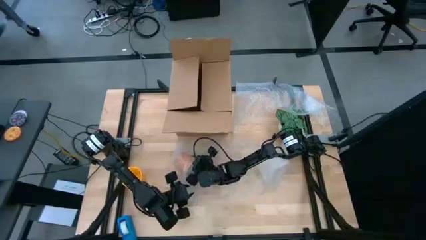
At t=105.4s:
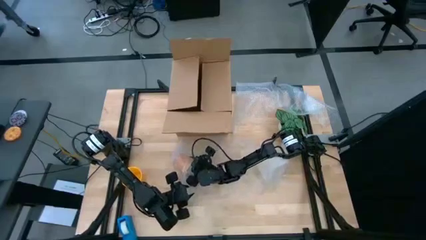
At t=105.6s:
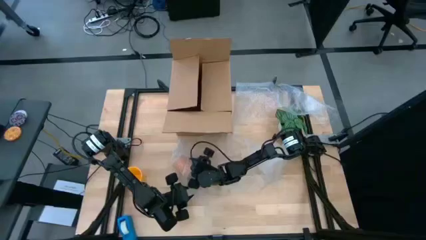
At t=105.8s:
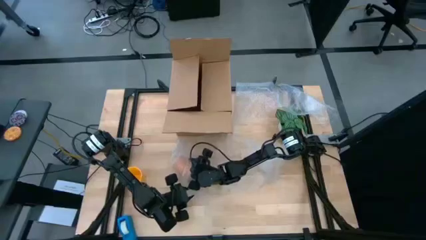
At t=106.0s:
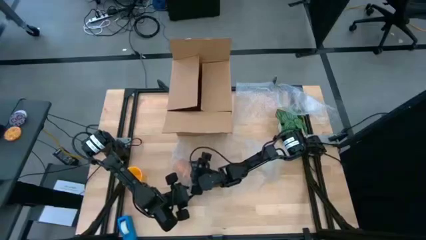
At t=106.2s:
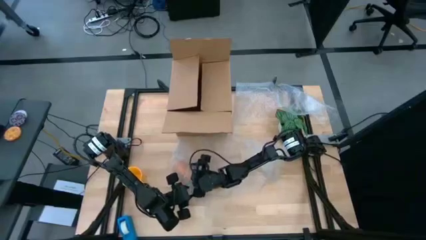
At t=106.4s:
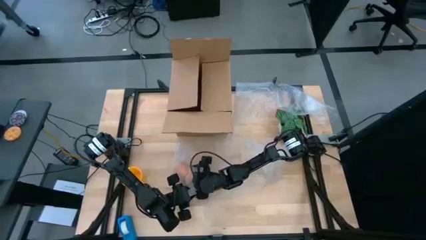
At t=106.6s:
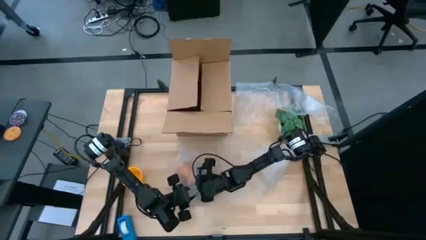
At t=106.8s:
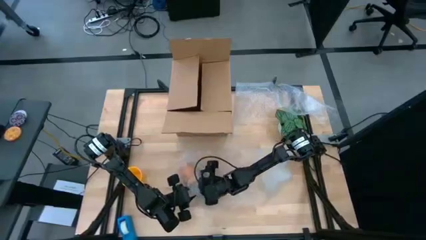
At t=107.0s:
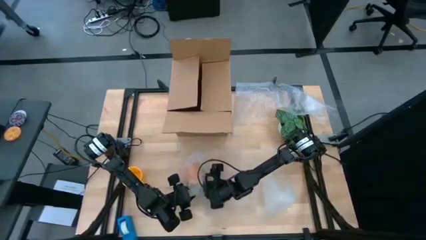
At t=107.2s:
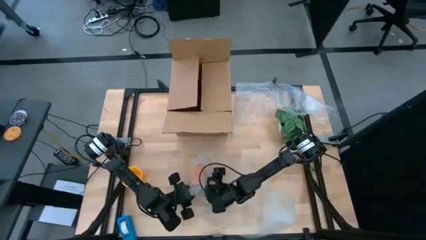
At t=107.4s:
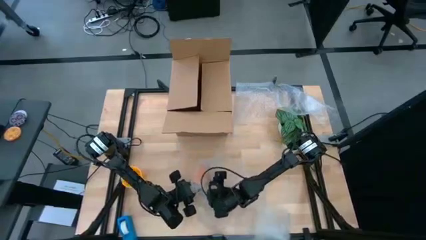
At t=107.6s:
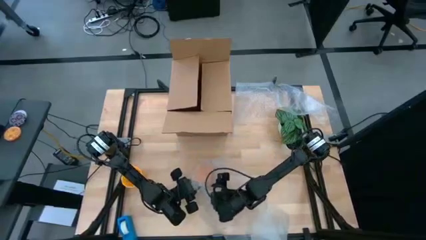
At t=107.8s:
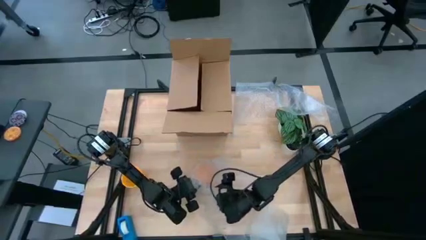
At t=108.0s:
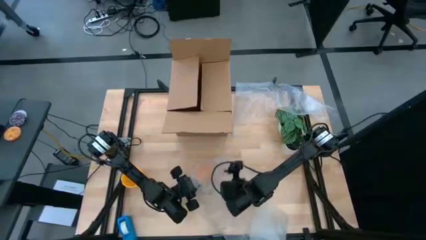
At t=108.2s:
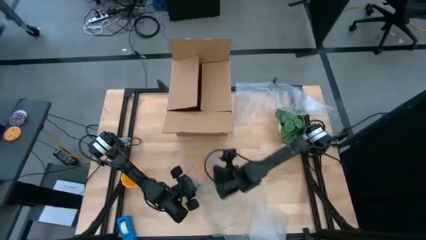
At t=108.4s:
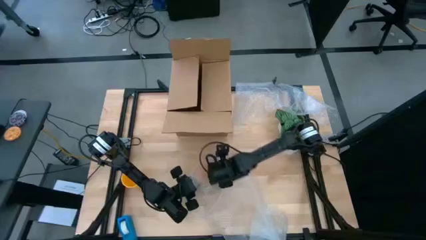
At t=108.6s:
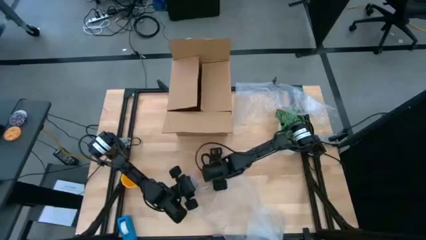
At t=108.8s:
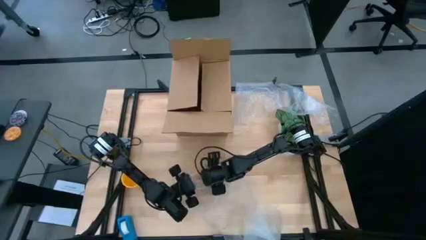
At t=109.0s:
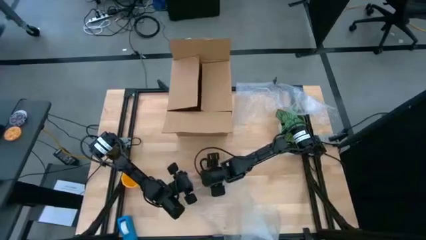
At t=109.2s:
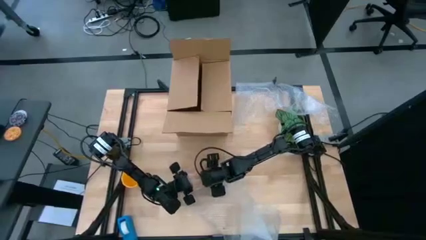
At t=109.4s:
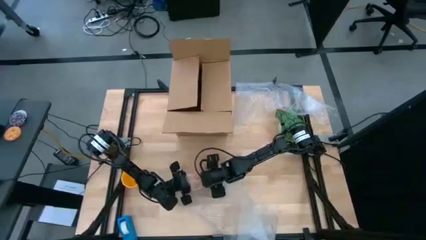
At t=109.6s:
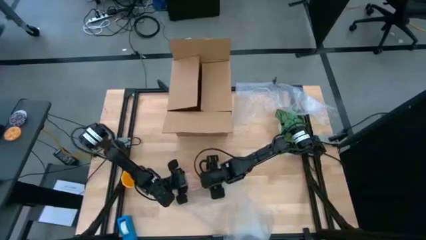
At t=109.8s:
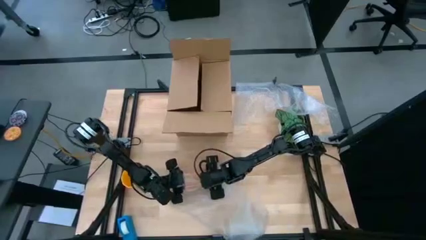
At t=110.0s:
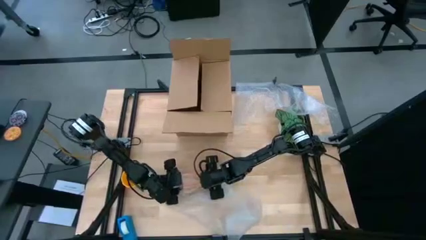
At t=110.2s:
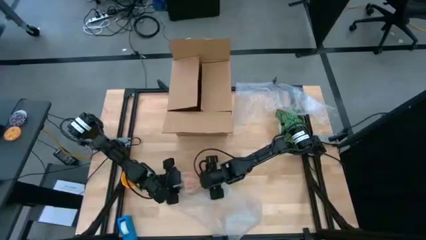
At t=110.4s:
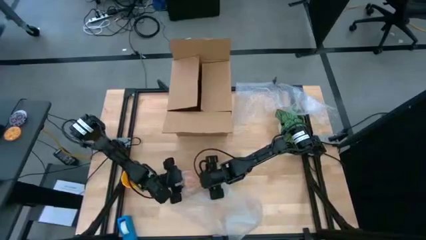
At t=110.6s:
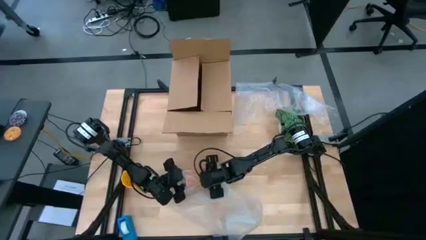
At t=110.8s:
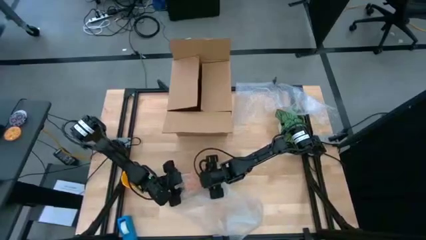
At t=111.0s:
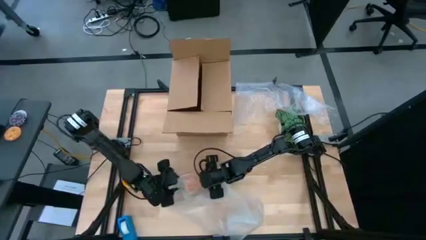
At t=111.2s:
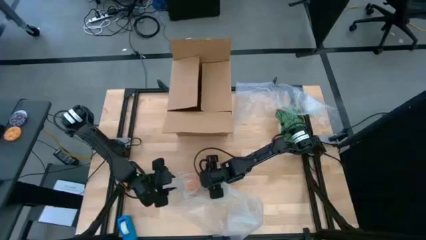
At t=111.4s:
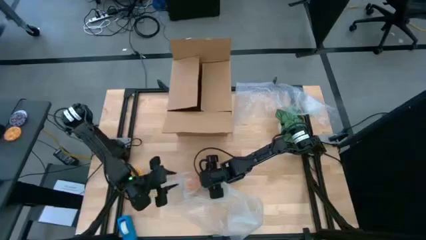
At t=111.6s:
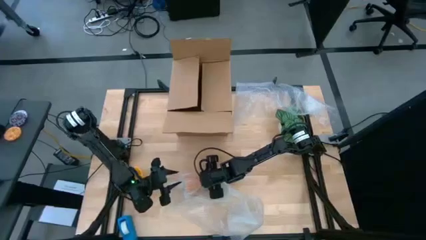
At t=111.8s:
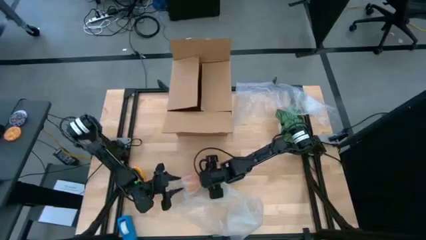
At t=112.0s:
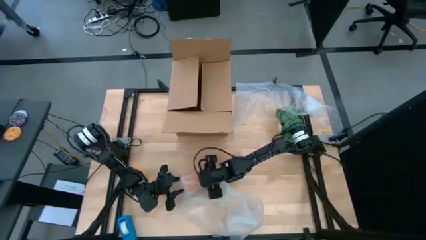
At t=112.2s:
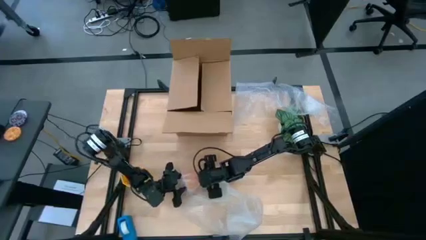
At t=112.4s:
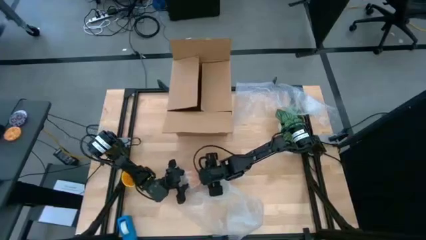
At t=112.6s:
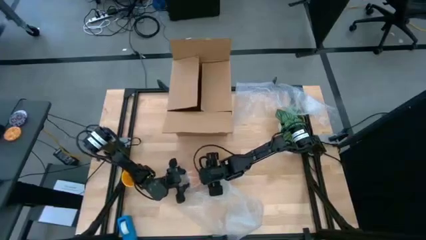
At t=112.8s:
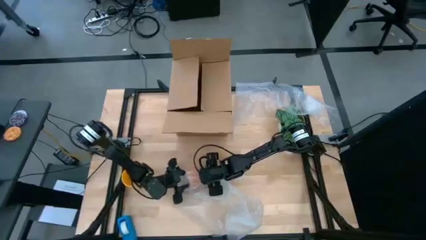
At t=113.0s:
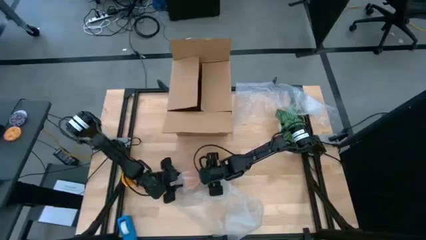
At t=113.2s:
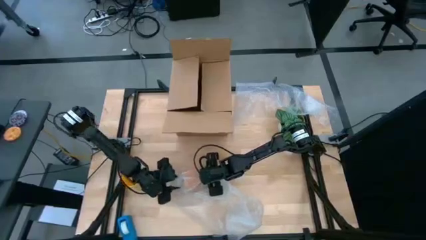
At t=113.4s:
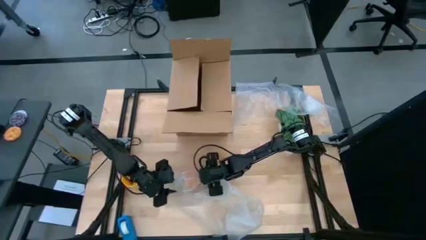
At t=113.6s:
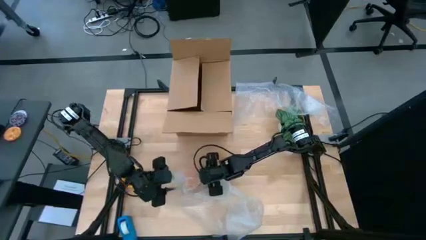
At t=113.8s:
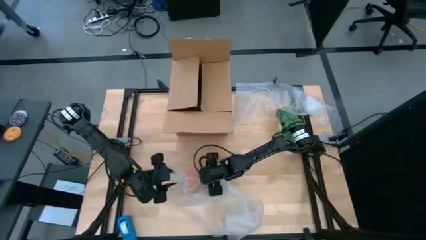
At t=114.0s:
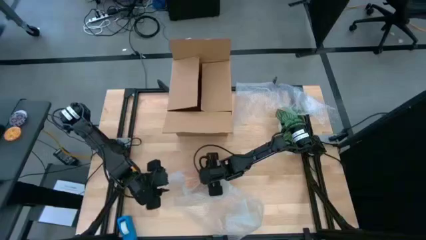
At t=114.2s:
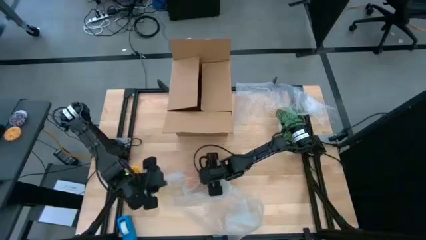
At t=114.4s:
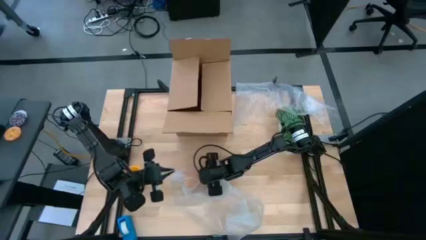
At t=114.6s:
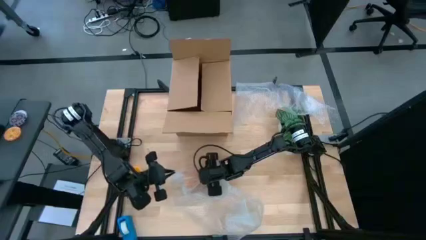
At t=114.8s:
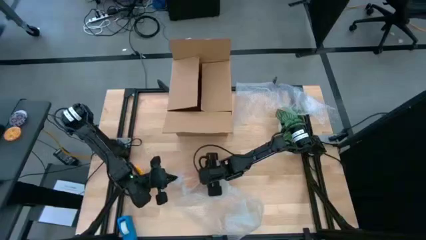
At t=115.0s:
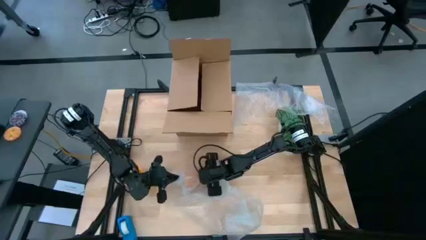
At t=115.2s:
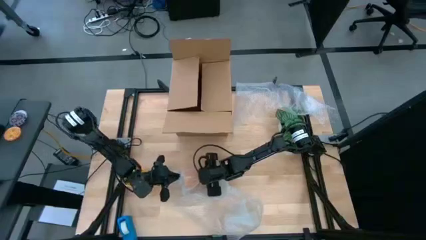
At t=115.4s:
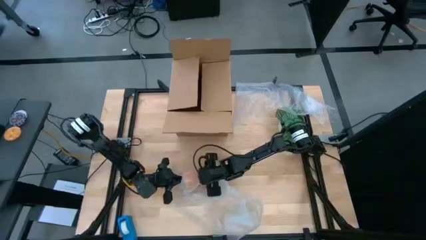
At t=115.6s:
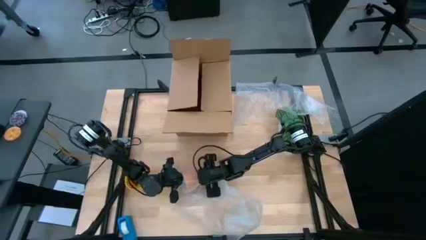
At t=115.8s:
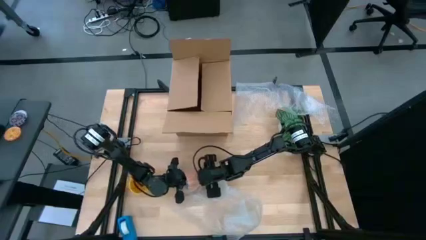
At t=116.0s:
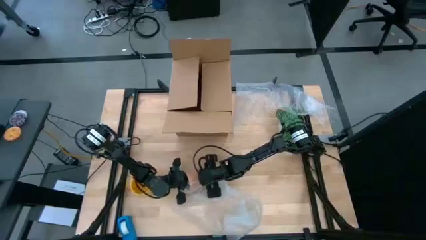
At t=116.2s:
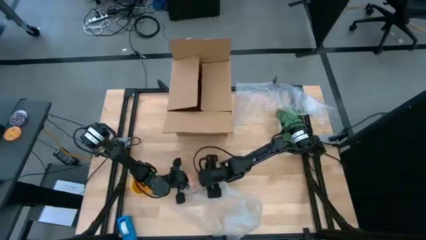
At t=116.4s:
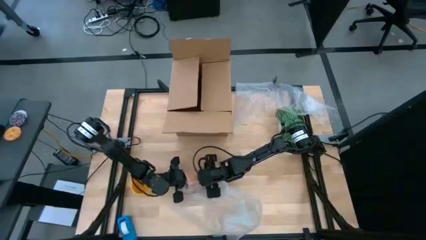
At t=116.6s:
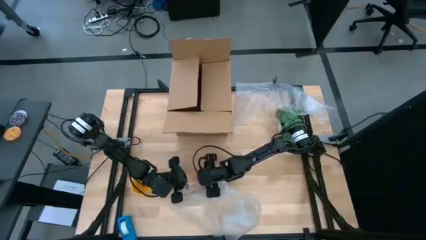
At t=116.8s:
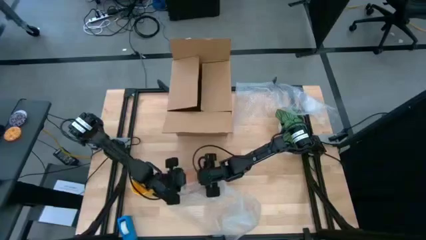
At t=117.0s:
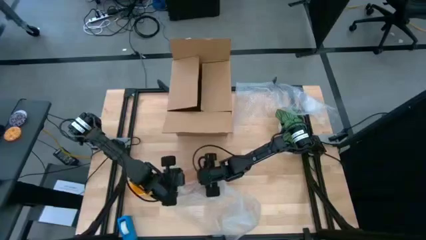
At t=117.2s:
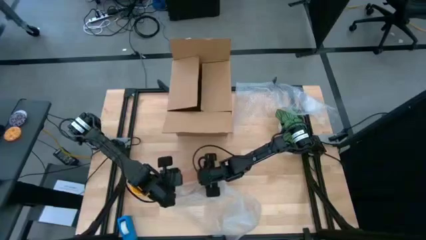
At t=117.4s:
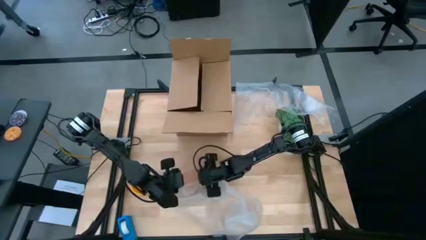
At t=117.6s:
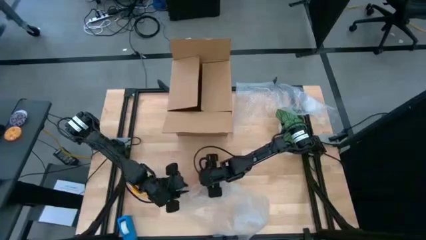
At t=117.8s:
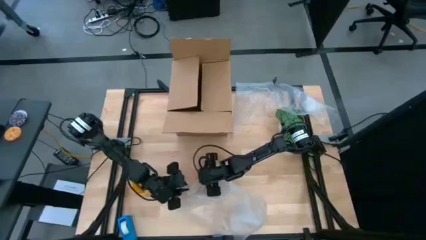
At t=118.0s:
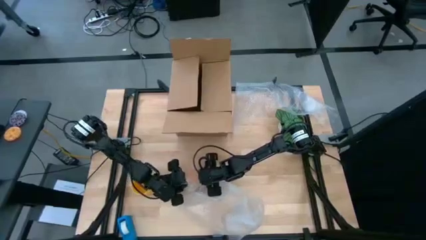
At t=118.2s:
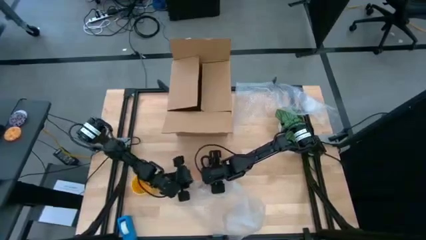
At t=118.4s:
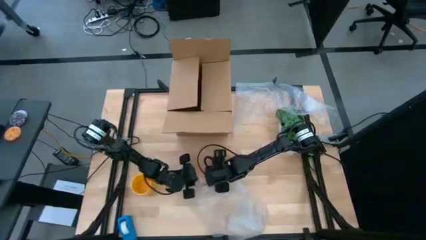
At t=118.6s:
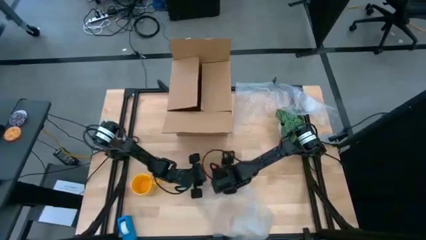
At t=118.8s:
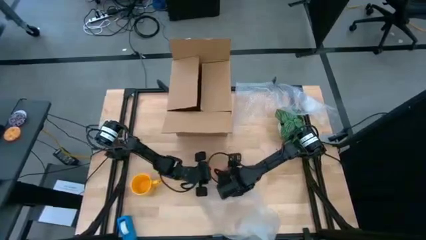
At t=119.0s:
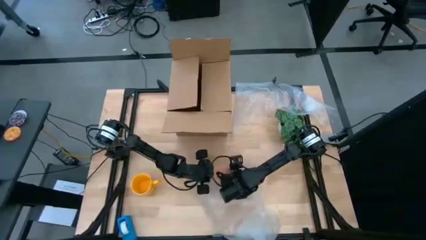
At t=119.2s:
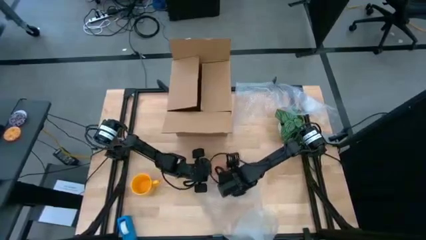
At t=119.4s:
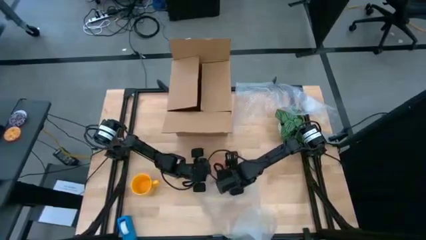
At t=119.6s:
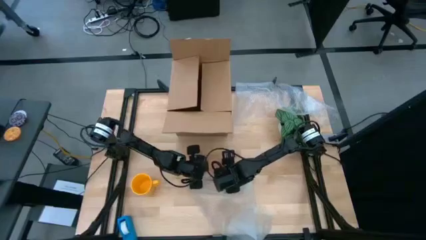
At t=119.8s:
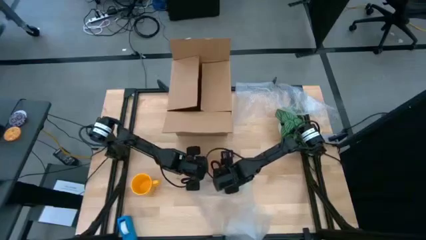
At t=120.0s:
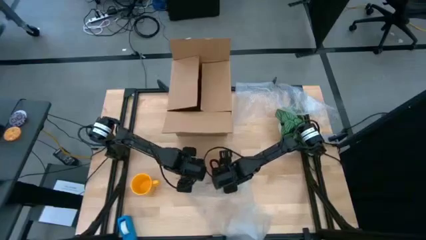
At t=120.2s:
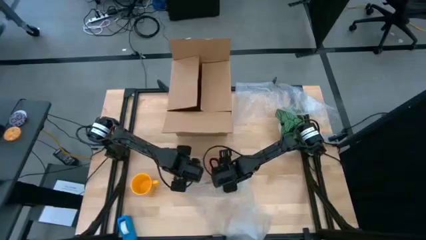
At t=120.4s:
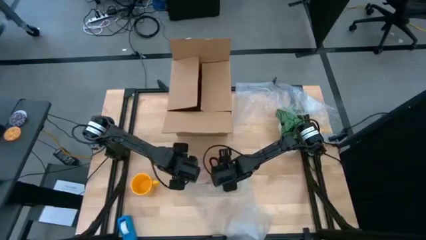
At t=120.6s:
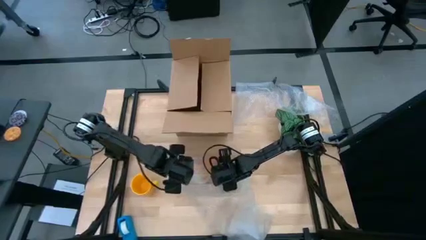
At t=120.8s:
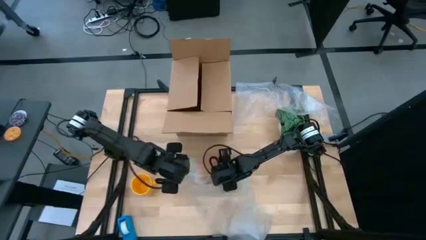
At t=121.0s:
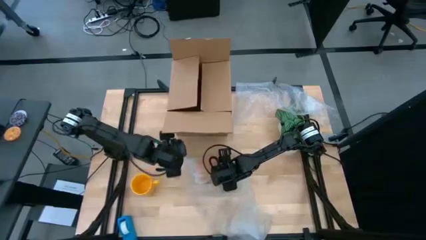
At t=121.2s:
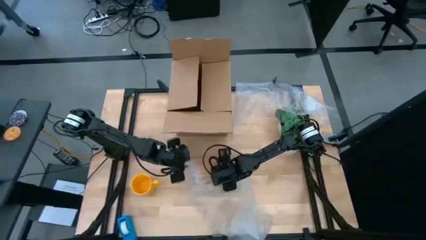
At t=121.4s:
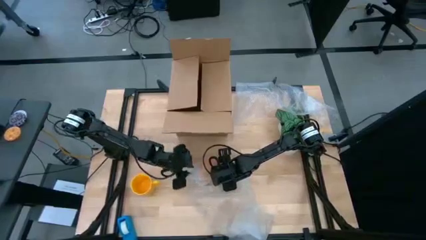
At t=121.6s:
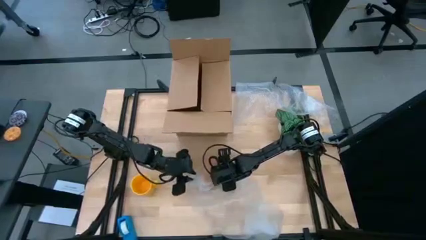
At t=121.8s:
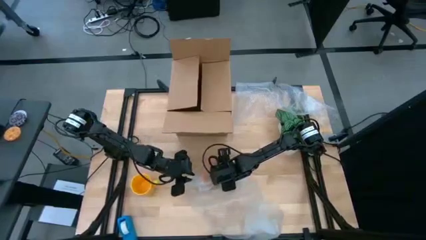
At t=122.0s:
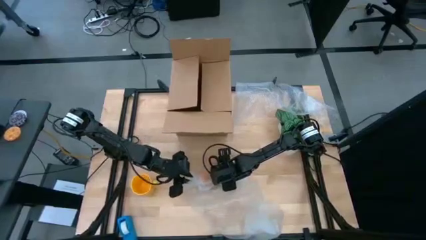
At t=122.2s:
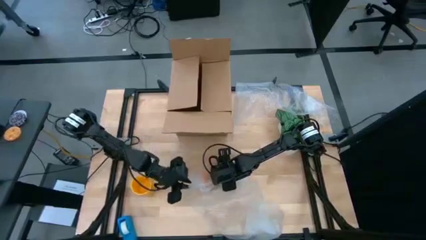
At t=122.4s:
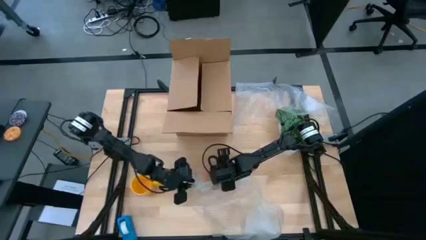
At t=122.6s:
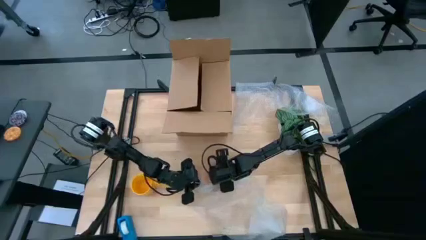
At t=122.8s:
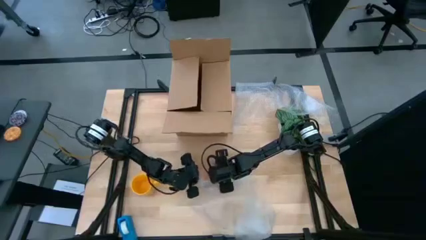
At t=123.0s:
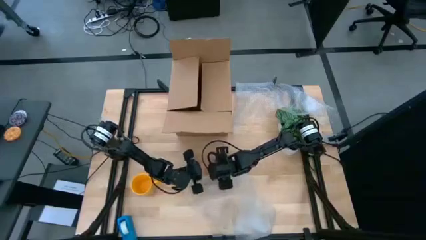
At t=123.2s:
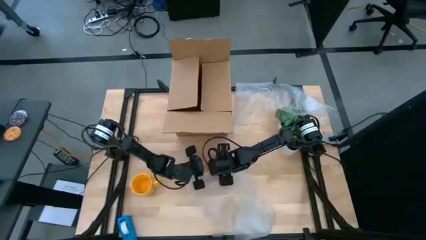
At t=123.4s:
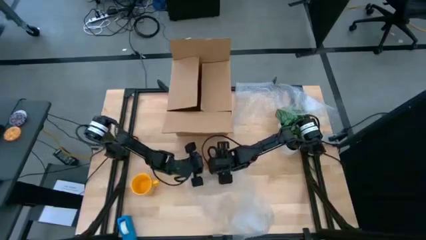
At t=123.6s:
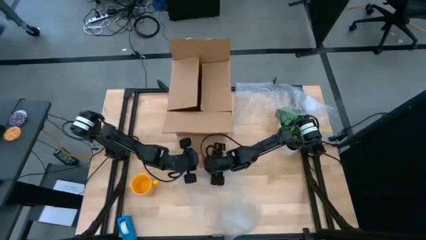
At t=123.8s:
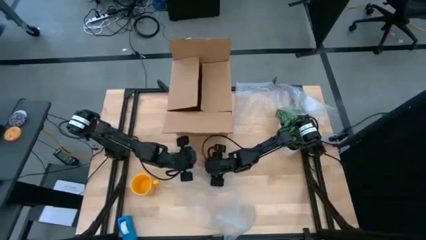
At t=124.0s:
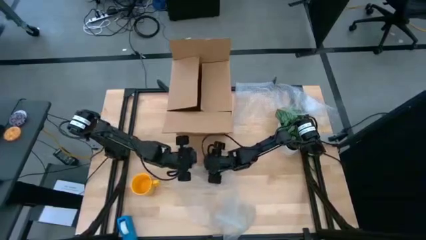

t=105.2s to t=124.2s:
Task: wrap mug
Wrap the orange cup with the bubble wrap
